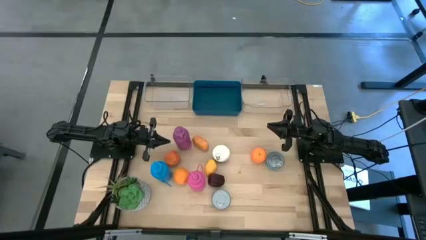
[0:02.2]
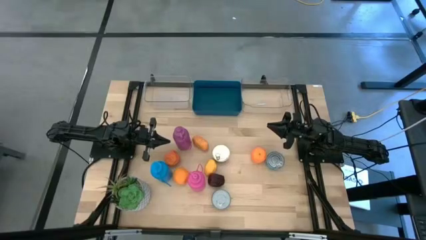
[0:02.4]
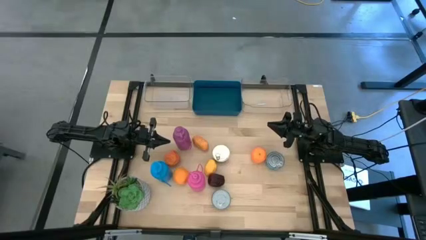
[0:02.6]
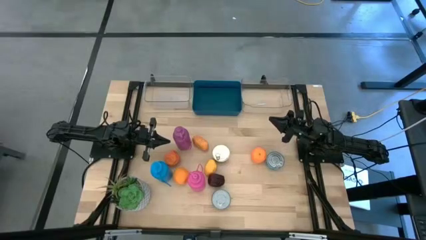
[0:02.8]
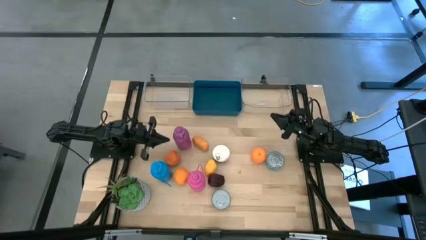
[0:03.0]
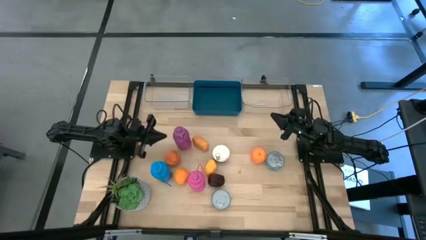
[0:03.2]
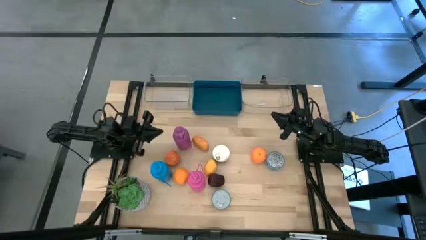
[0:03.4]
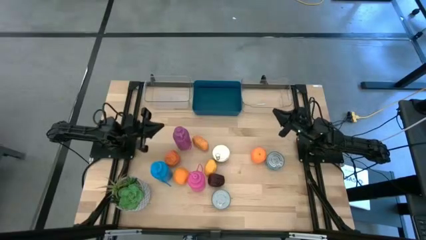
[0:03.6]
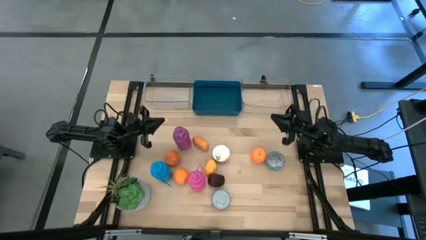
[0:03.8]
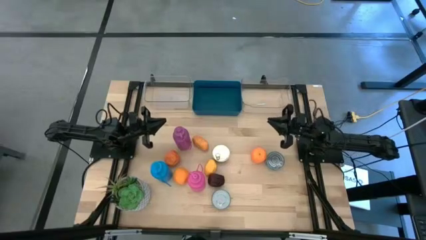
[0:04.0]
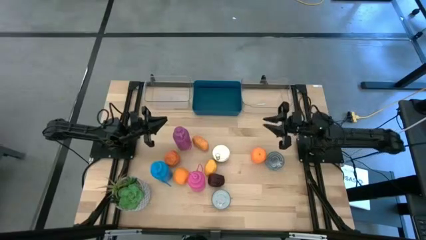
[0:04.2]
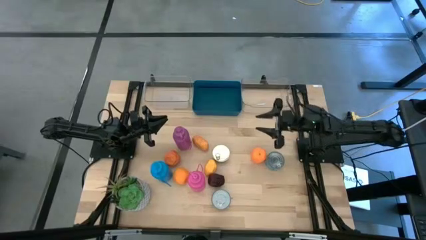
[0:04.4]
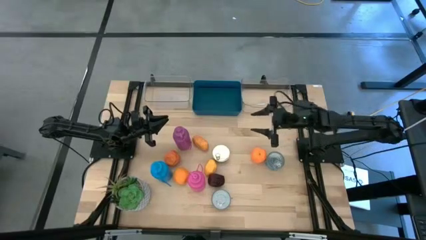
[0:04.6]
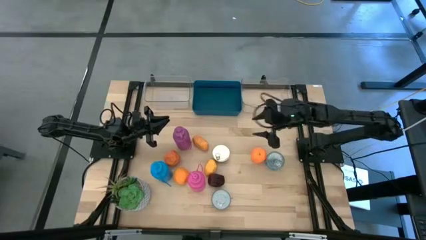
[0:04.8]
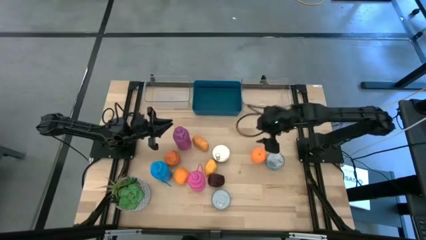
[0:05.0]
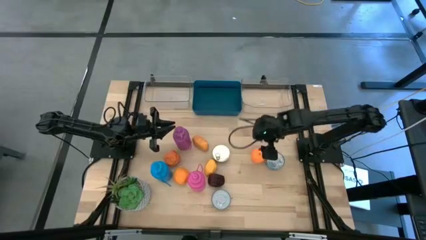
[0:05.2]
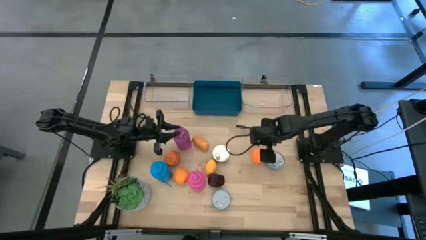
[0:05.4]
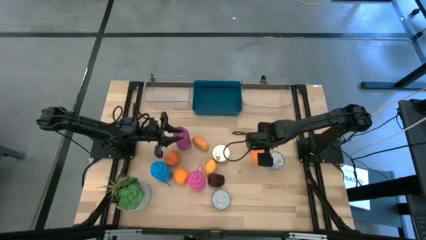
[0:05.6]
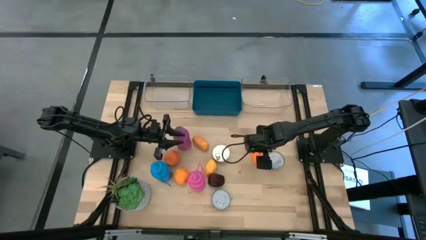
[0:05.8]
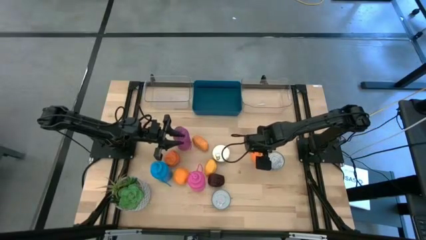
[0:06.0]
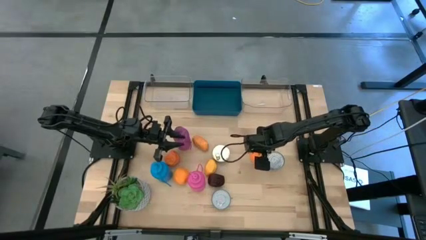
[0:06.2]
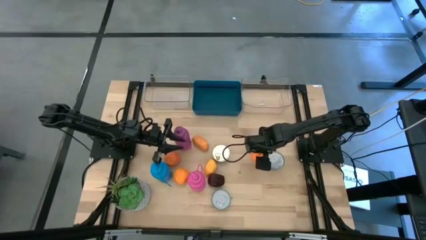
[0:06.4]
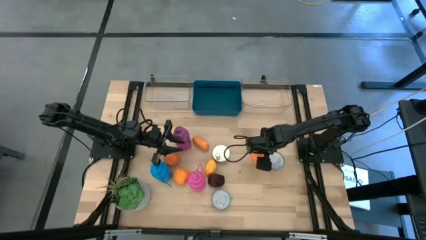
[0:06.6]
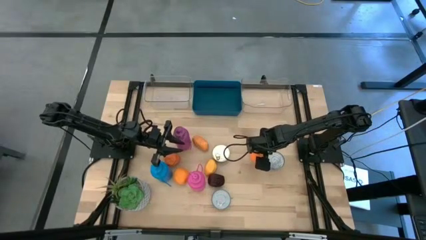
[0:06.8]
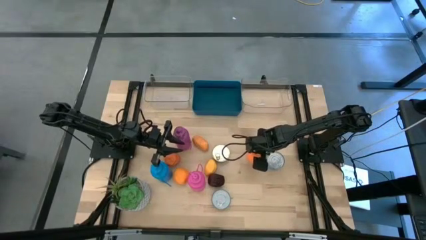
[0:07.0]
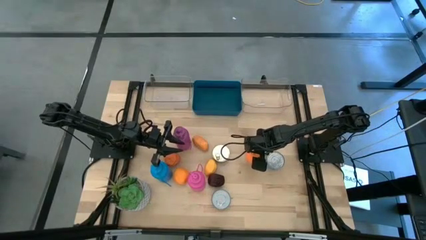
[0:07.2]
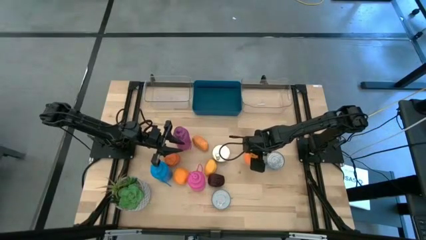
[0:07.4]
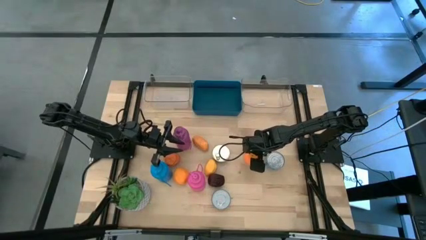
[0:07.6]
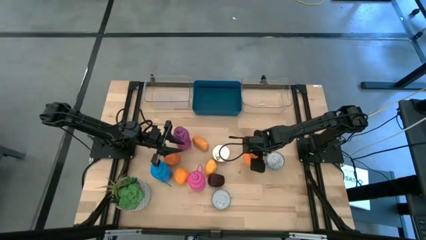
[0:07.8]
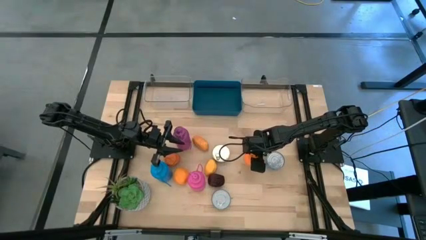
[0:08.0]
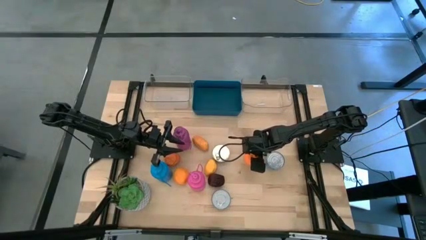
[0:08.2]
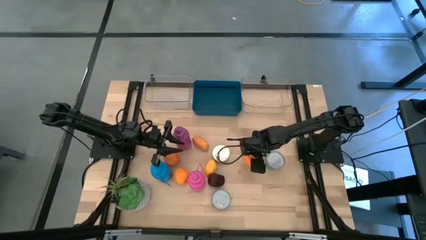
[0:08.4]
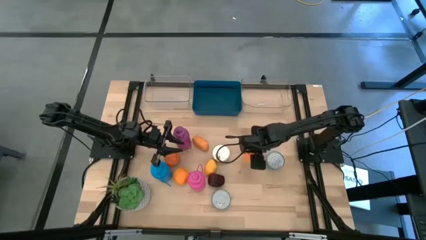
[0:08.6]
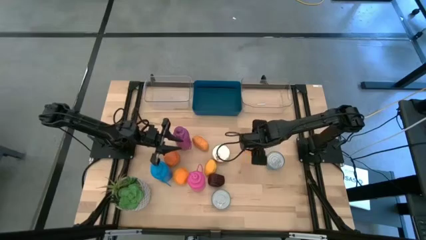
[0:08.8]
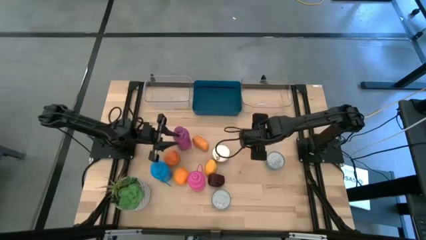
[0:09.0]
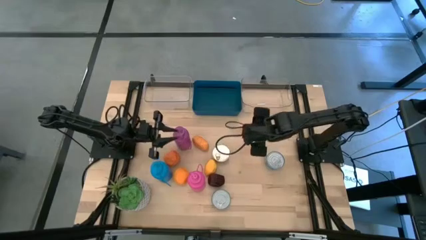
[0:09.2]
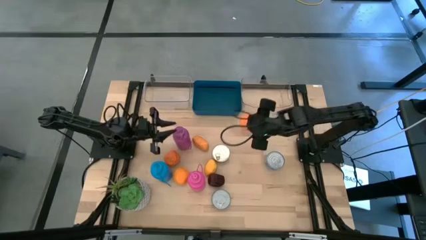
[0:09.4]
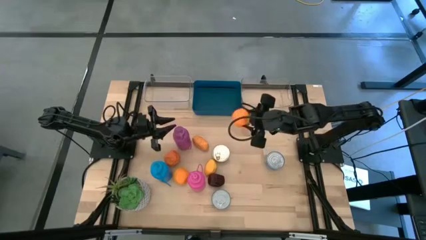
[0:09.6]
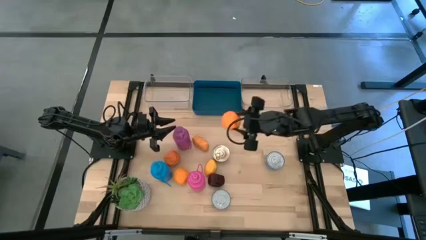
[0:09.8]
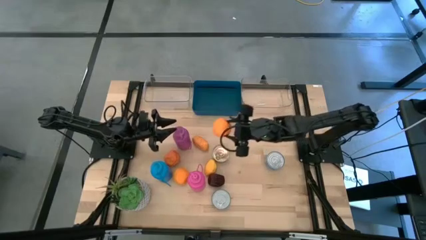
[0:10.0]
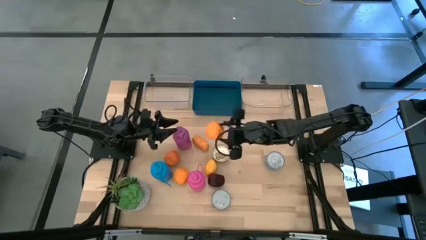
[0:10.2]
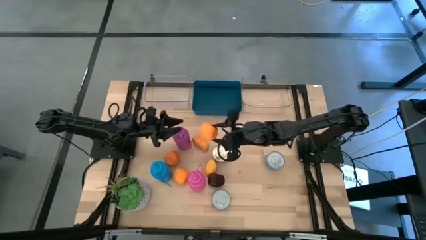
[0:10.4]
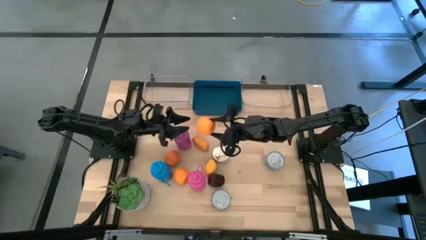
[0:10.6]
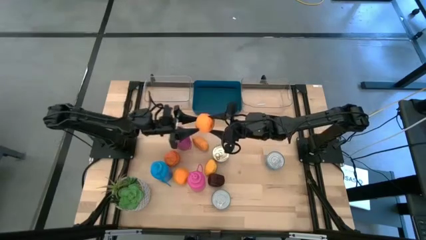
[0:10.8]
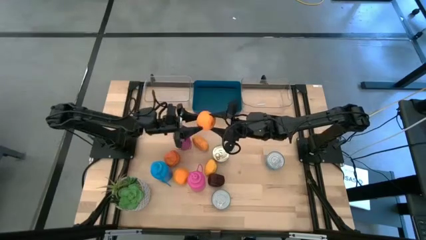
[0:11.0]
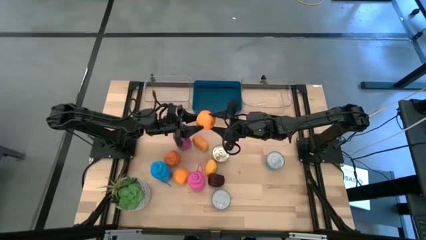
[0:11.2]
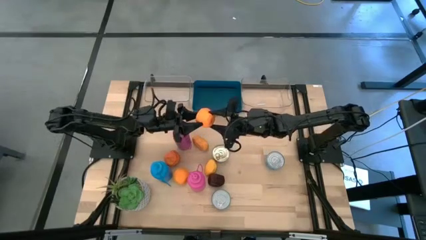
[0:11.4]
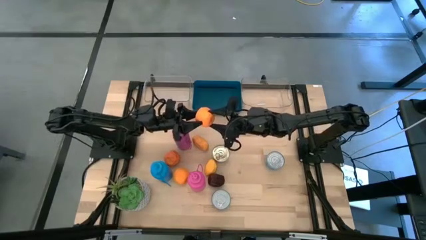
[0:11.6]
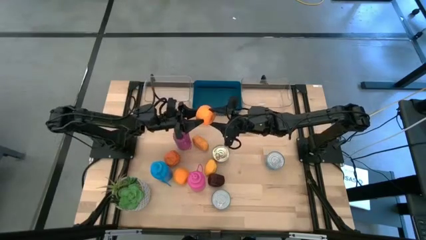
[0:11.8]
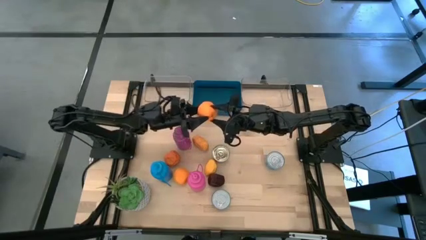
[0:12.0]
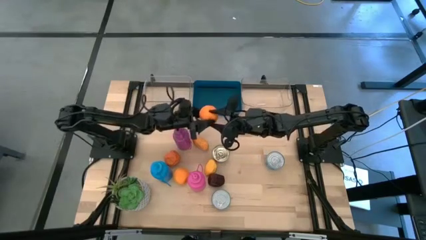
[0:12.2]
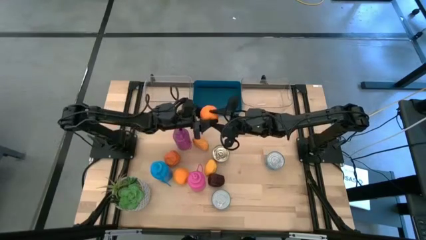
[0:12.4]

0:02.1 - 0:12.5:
Task: Pick & Place Food Item
Put the right orange into the left transparent bin

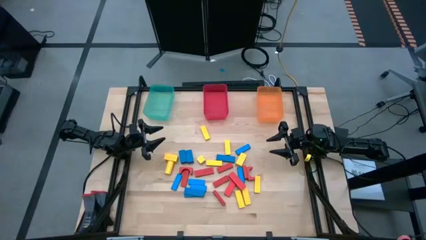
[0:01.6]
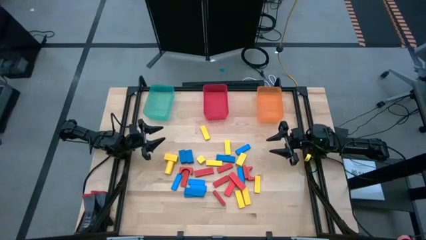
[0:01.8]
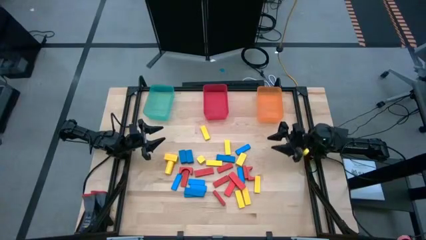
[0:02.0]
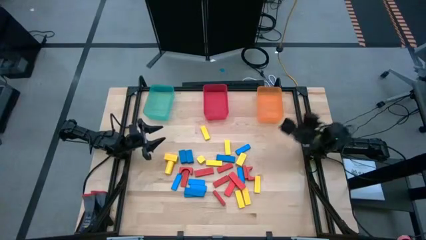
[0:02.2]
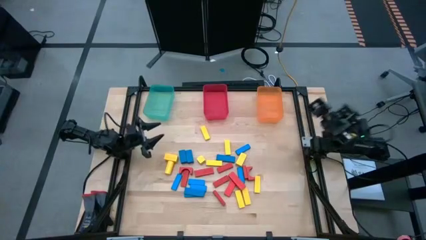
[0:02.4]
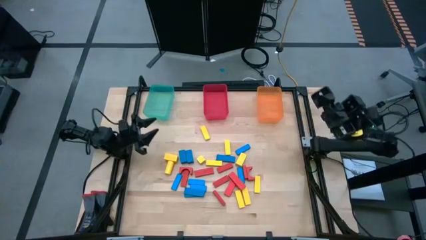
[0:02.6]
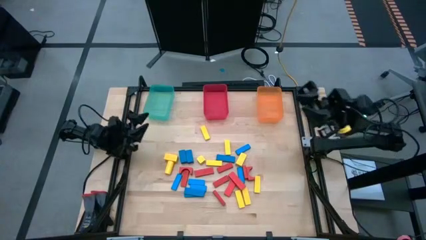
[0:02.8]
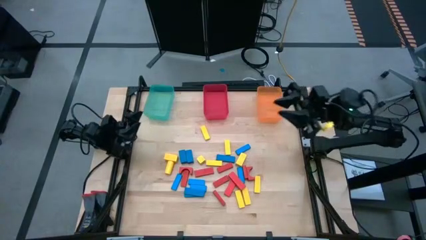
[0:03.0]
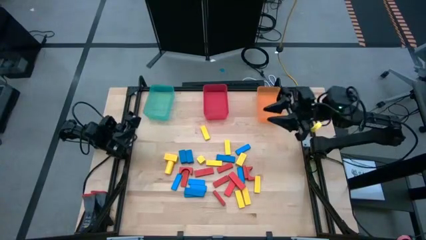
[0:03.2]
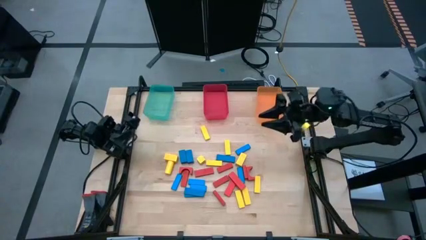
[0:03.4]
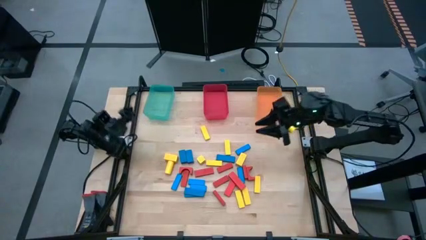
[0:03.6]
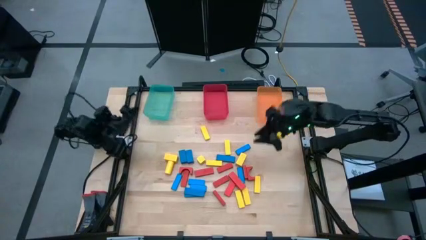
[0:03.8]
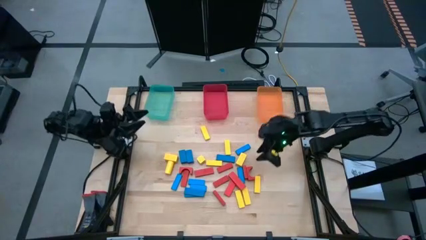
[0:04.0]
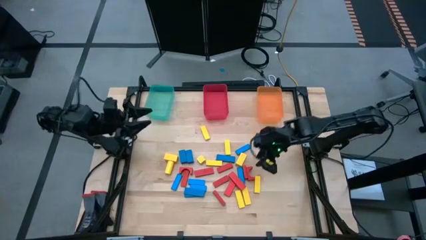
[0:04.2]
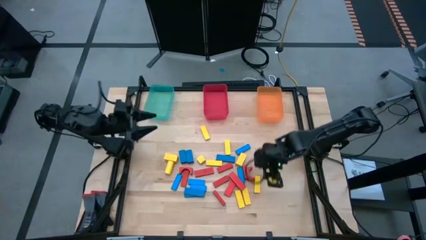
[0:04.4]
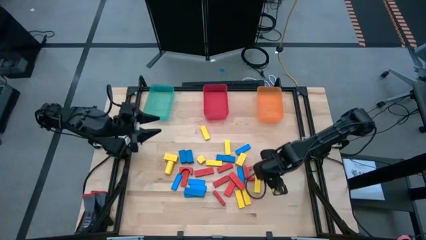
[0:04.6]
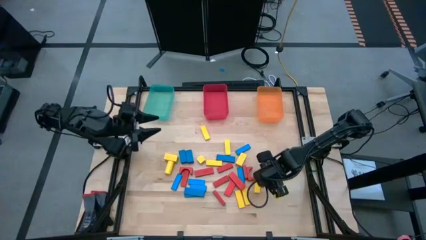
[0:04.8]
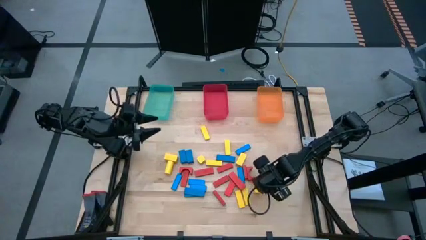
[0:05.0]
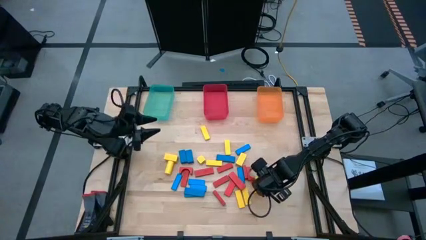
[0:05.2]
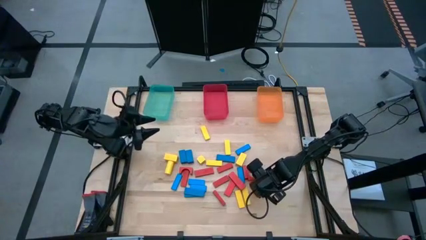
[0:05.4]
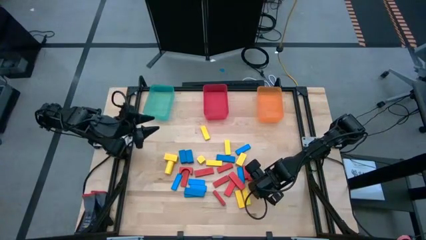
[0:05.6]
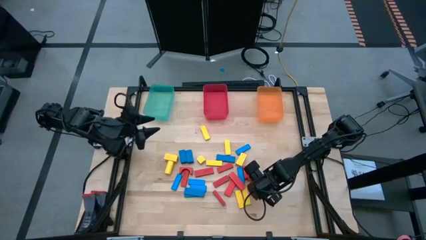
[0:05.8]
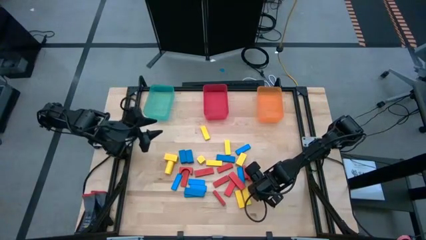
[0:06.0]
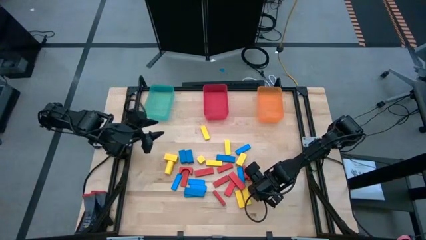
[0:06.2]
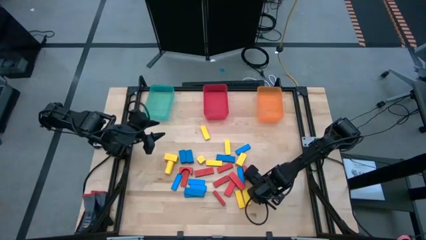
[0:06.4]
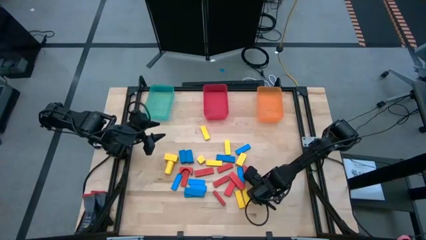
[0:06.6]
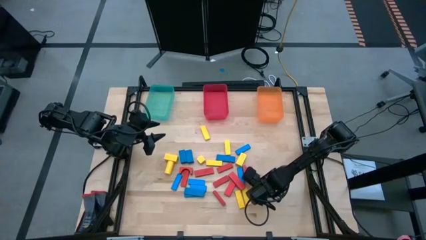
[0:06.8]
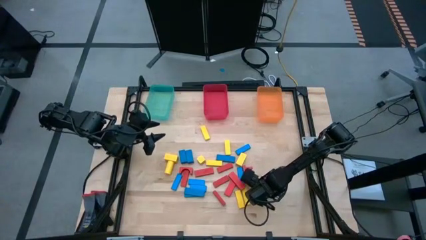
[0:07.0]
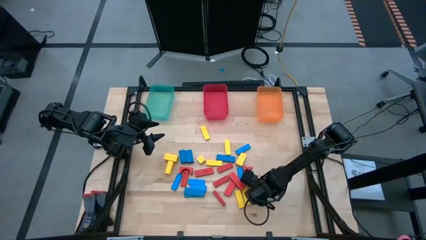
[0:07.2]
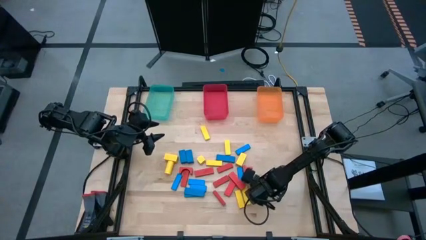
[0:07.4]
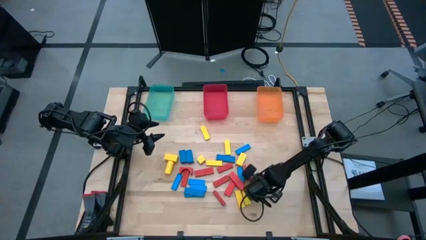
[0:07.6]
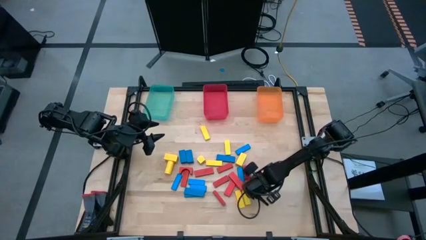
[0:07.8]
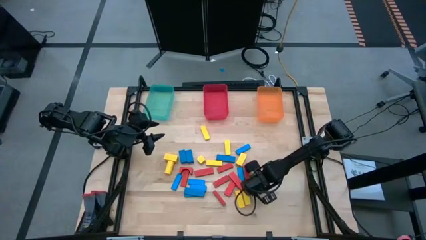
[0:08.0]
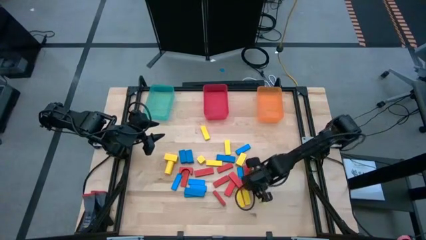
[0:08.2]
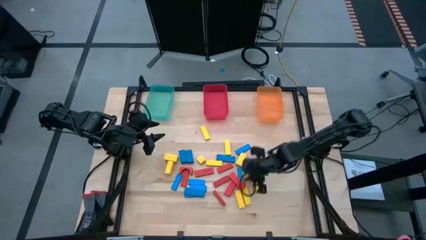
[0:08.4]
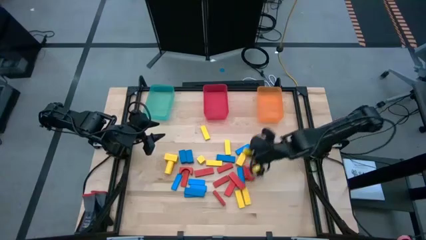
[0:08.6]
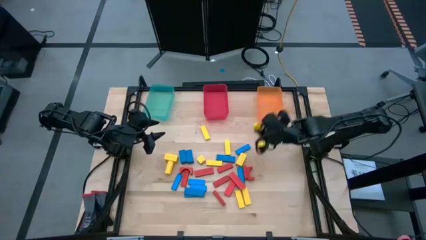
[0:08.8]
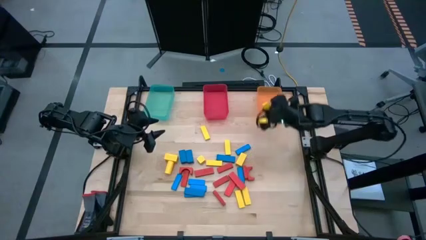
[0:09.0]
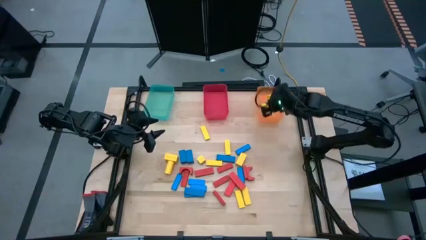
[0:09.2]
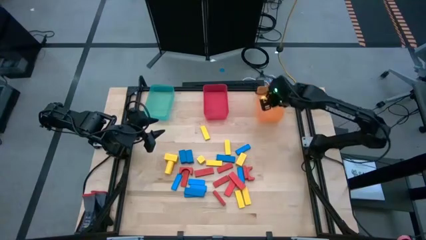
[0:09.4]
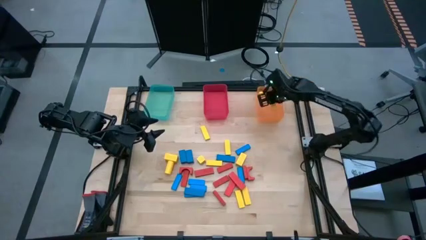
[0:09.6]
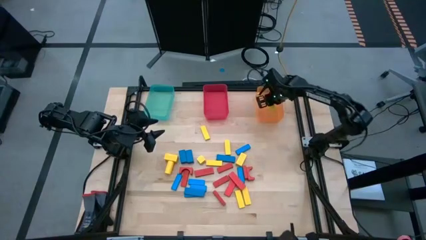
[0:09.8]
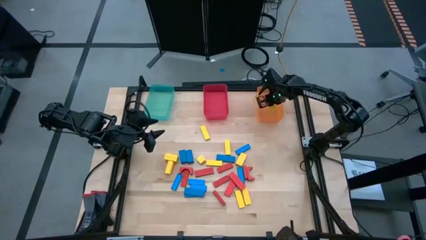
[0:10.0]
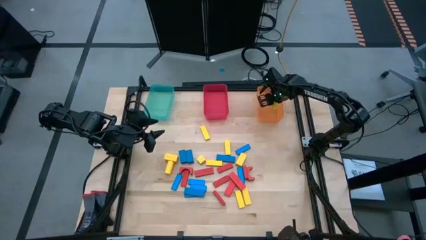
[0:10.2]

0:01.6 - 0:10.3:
Task: Sort blocks
Put the yellow block into the orange bin
